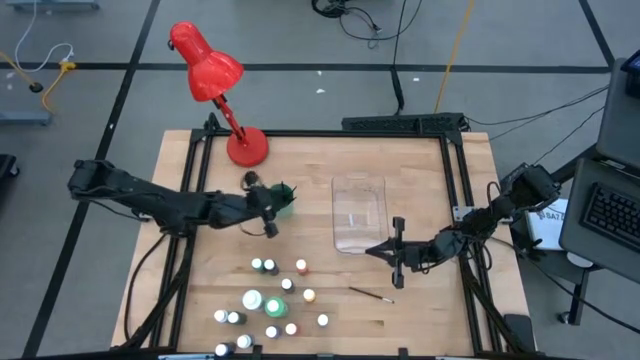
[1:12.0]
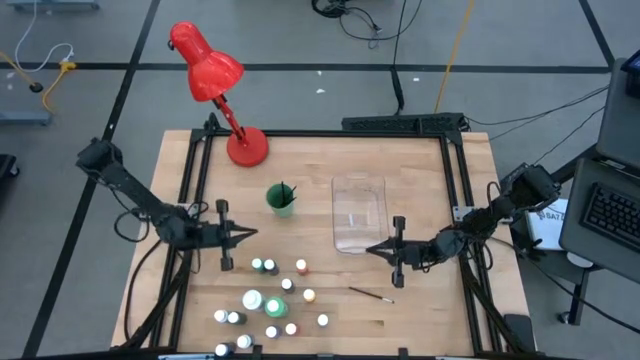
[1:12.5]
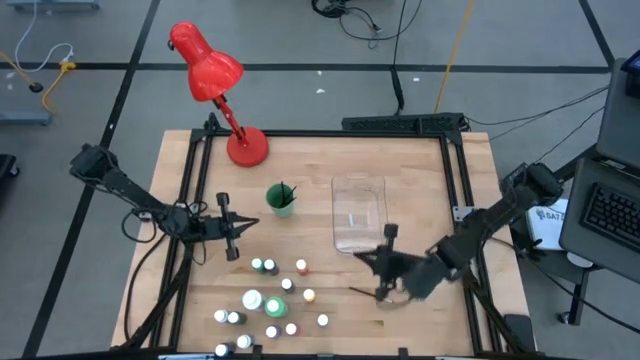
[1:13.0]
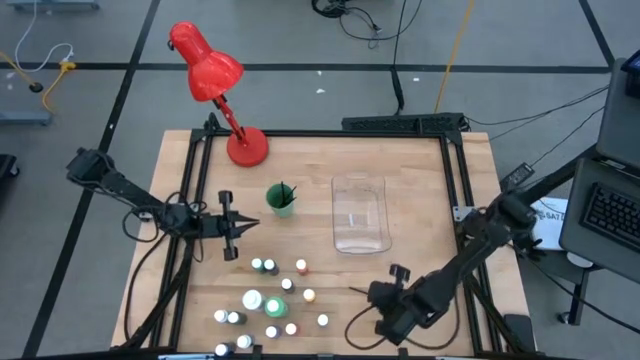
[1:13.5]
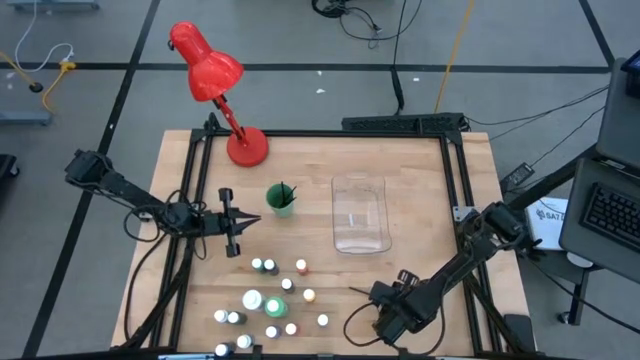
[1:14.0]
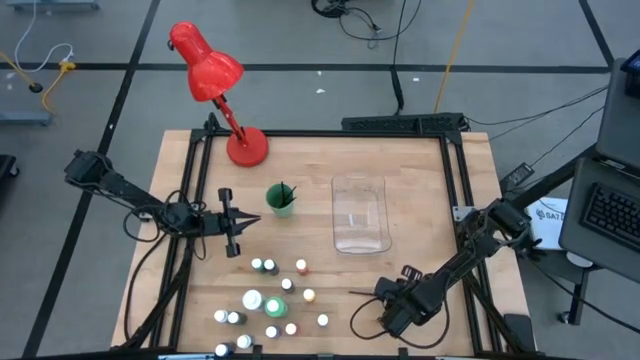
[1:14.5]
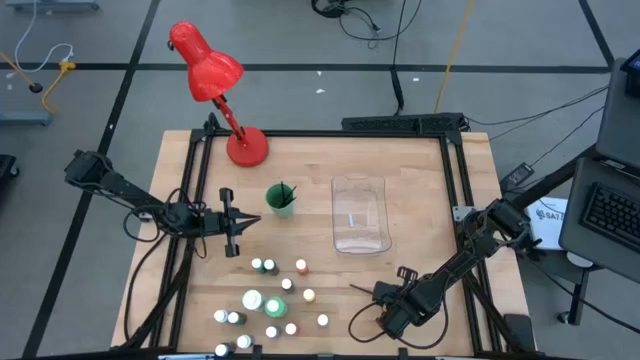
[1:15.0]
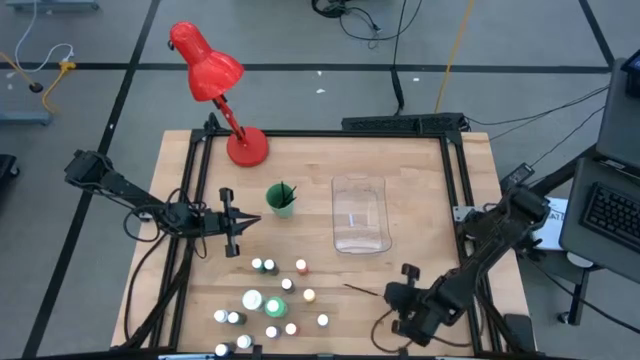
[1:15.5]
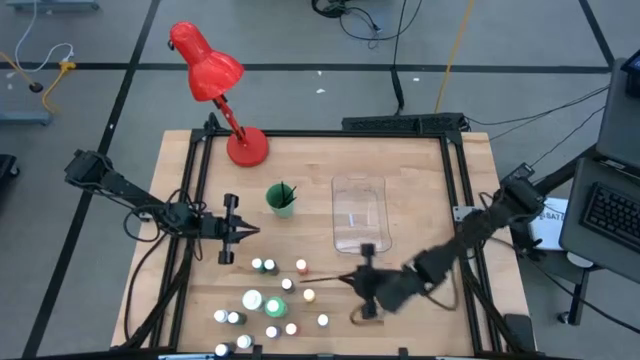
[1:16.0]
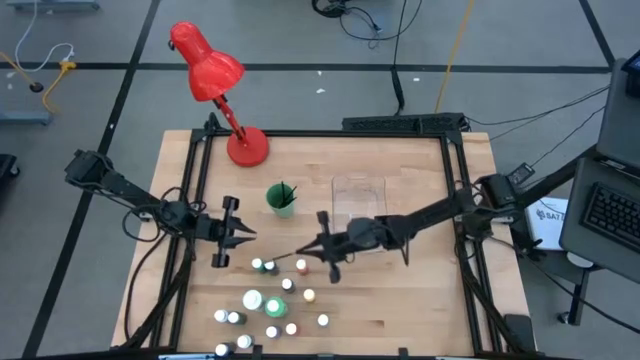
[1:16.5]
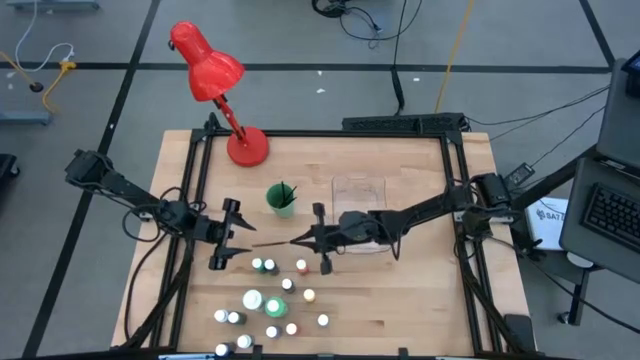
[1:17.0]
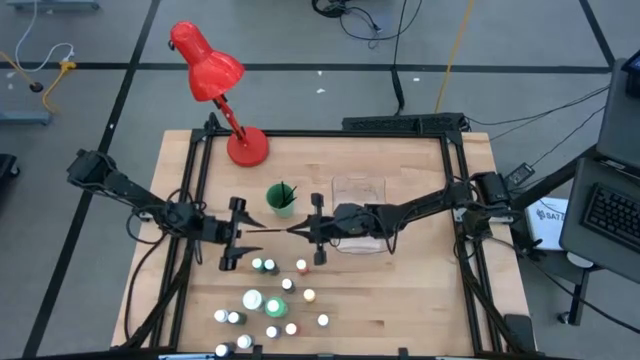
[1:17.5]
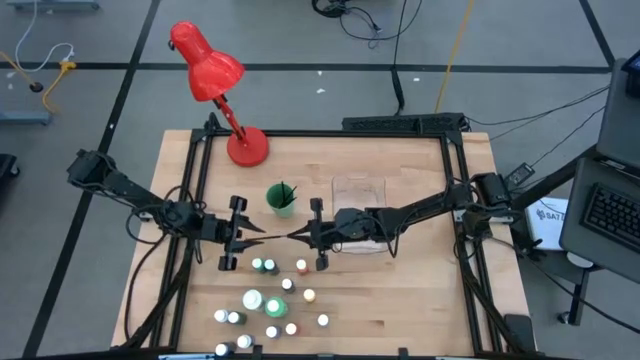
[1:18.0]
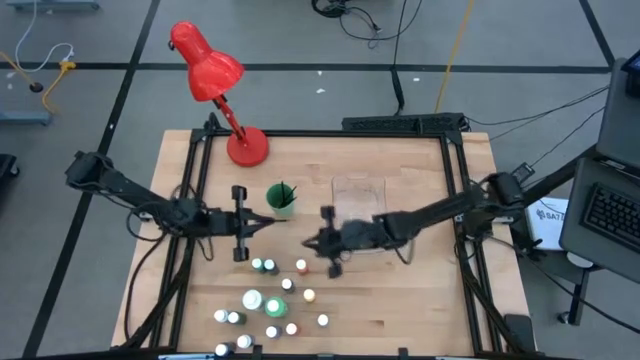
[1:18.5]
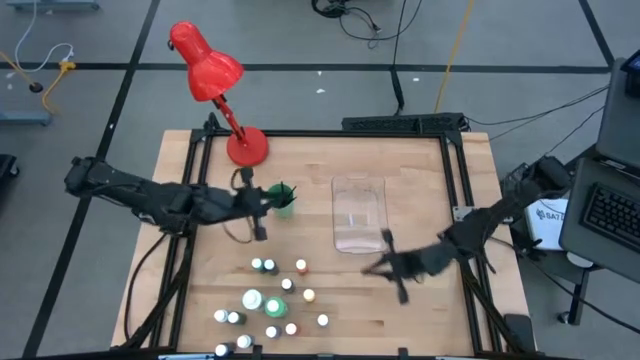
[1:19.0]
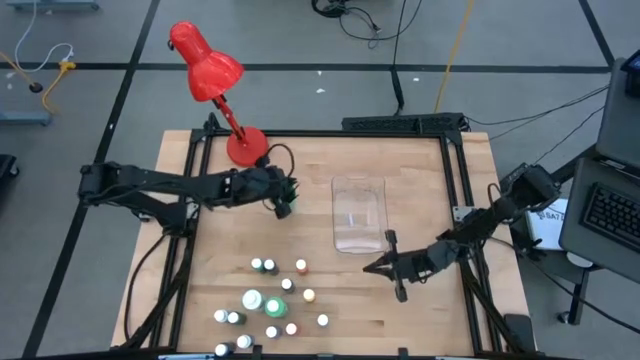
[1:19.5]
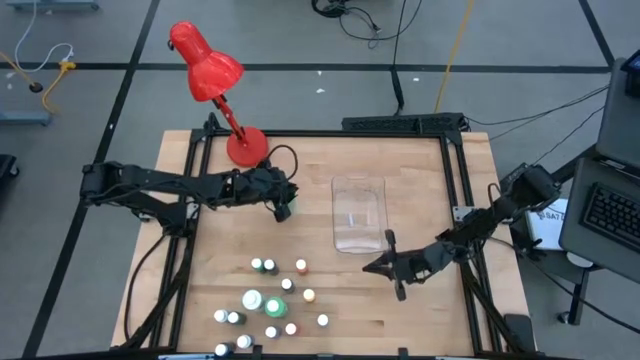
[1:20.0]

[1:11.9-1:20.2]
Task: Pick & Place Paint Supplies
Put the silver paintbrush into the green cup

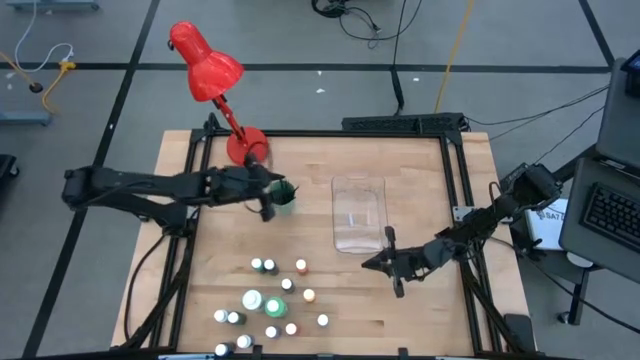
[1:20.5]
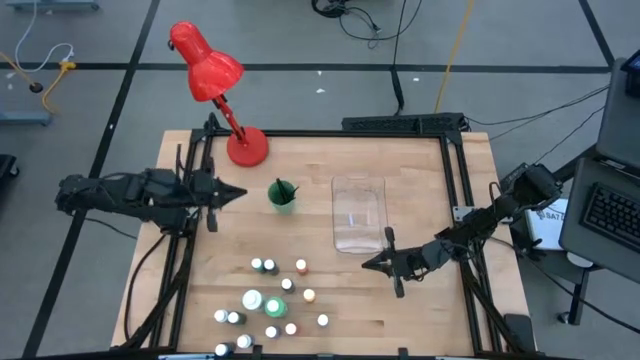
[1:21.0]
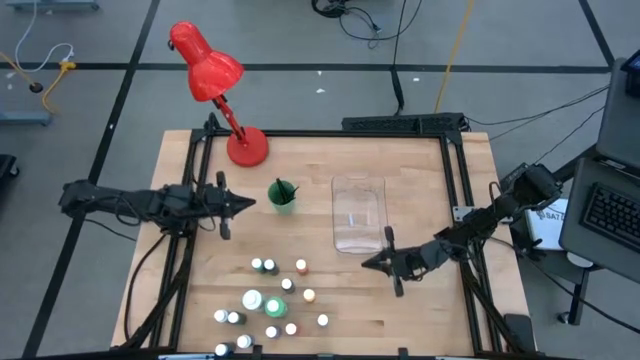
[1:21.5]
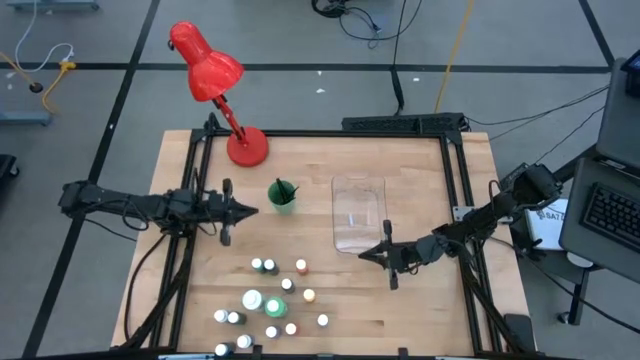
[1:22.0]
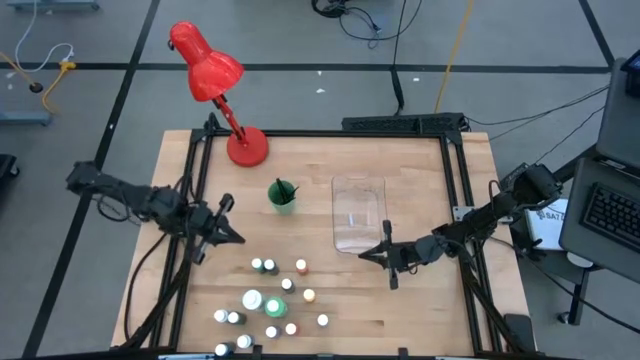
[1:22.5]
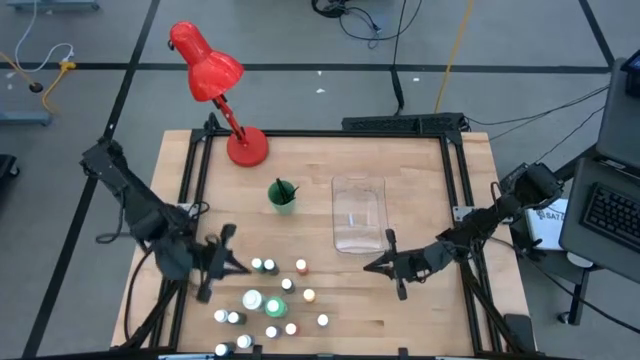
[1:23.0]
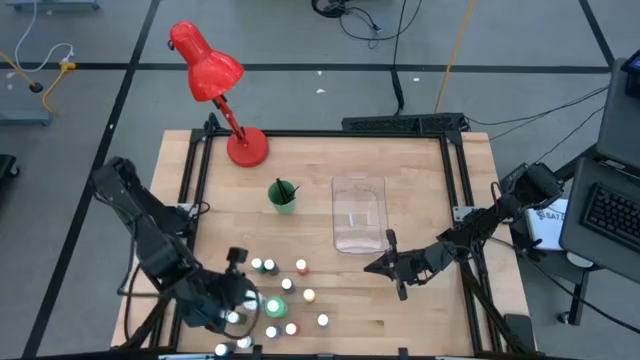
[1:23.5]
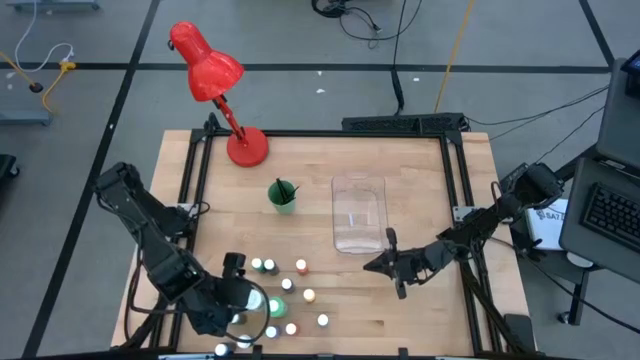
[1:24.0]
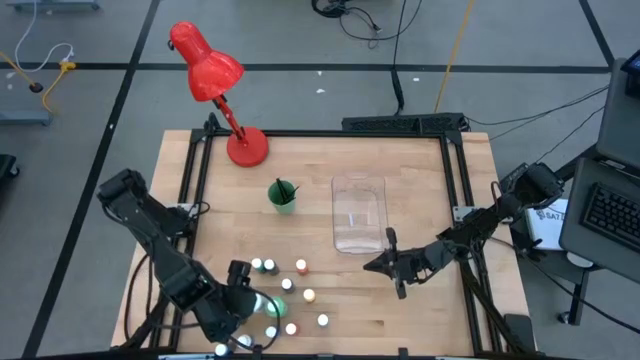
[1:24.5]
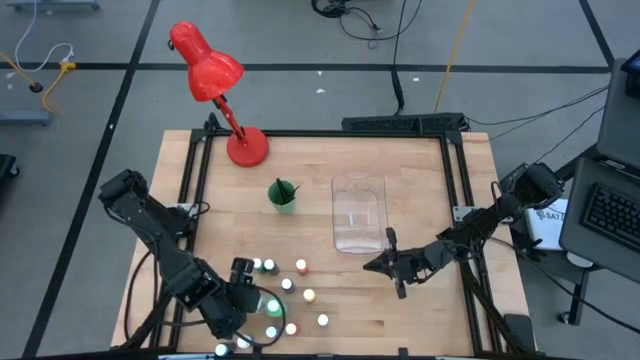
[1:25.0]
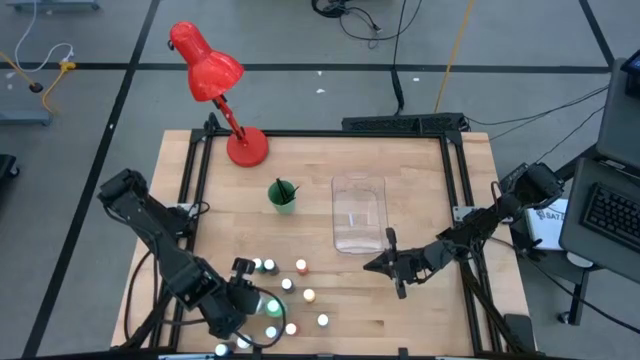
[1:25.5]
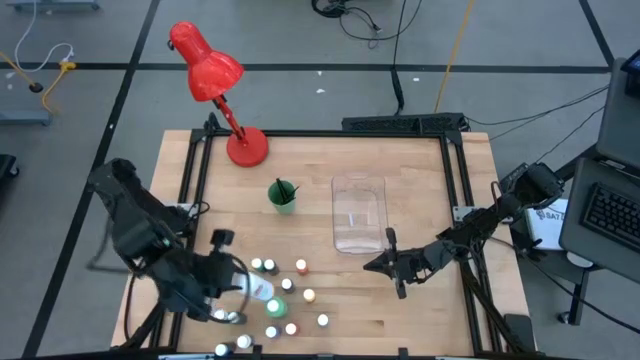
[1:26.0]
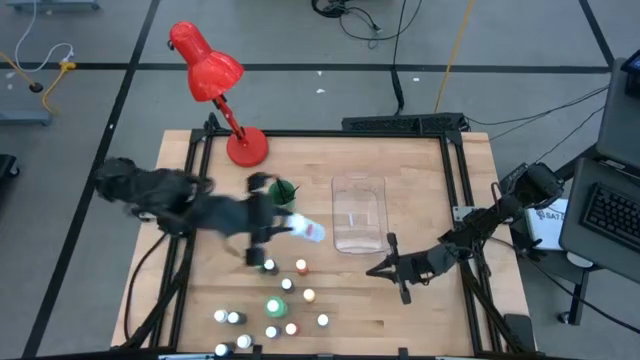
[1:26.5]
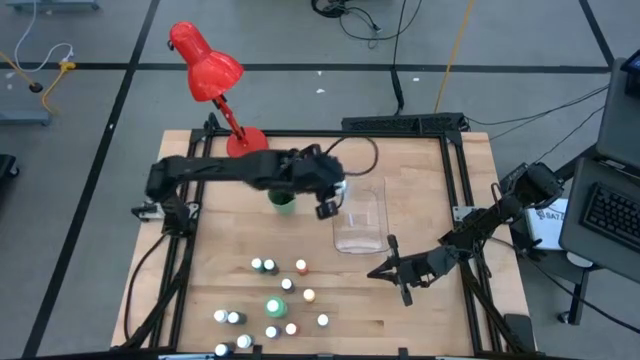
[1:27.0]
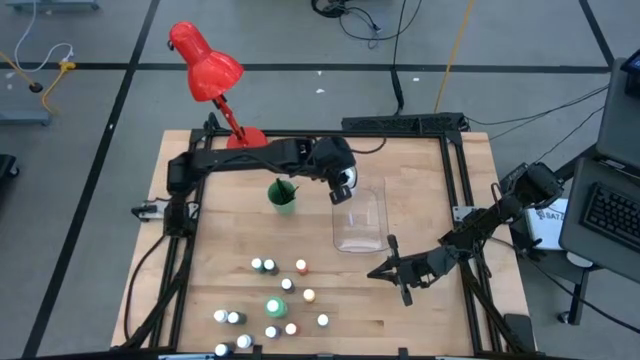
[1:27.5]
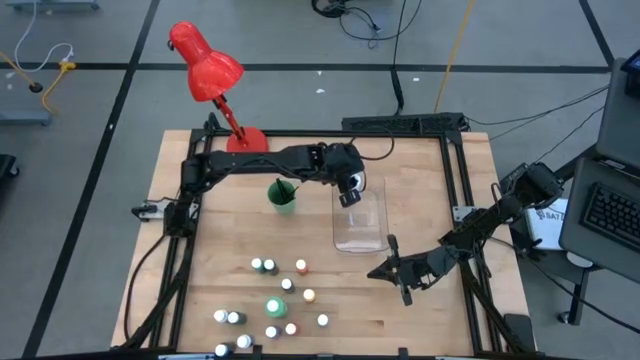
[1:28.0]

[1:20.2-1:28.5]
Put the large white paint bottle into the transparent bin

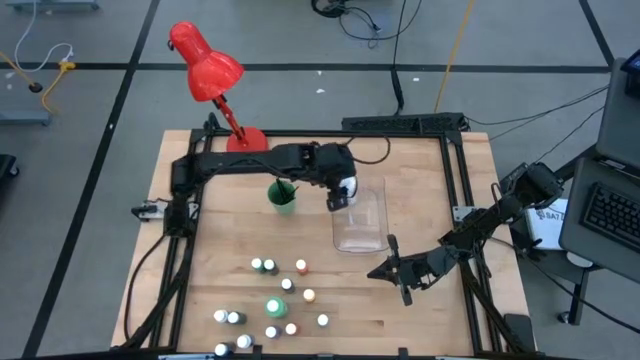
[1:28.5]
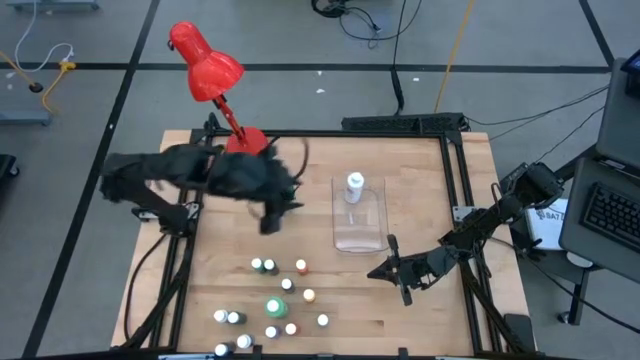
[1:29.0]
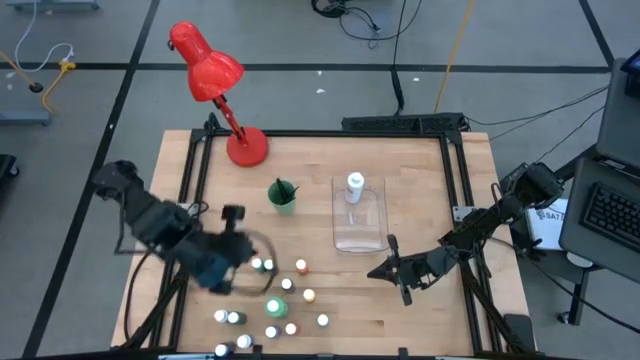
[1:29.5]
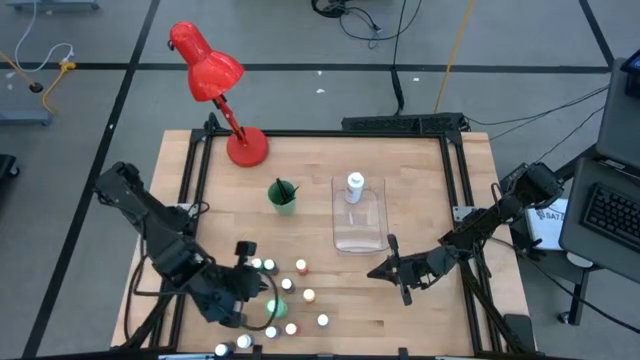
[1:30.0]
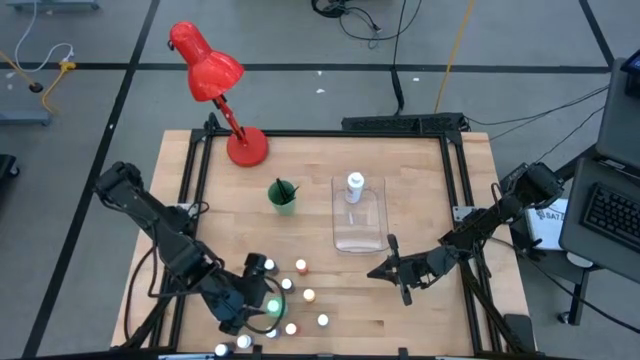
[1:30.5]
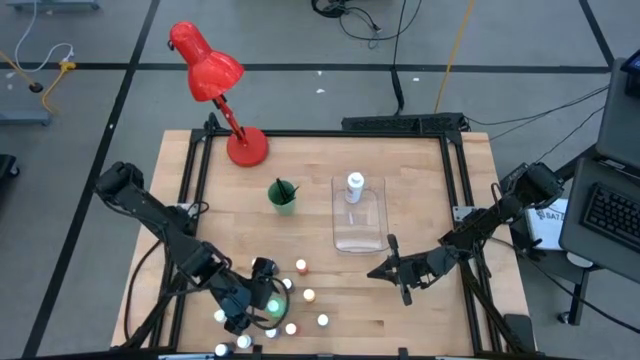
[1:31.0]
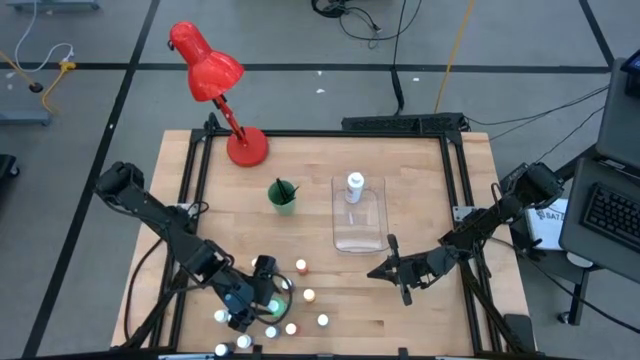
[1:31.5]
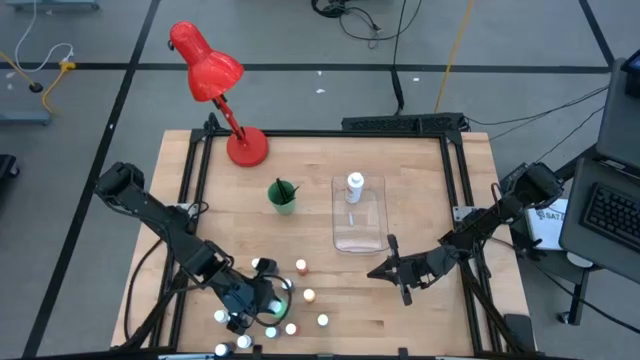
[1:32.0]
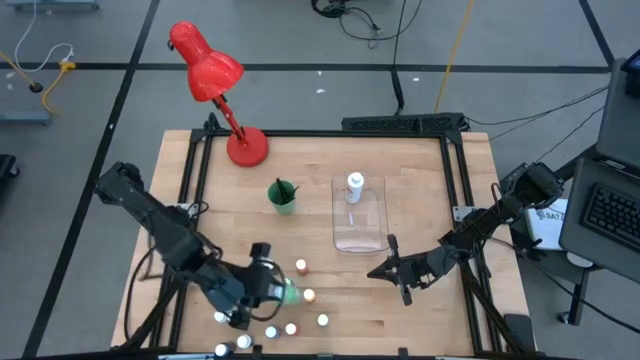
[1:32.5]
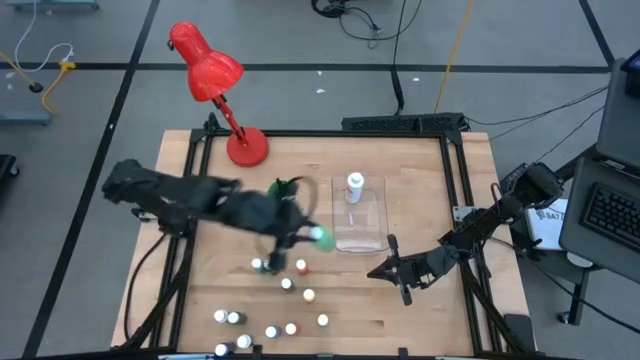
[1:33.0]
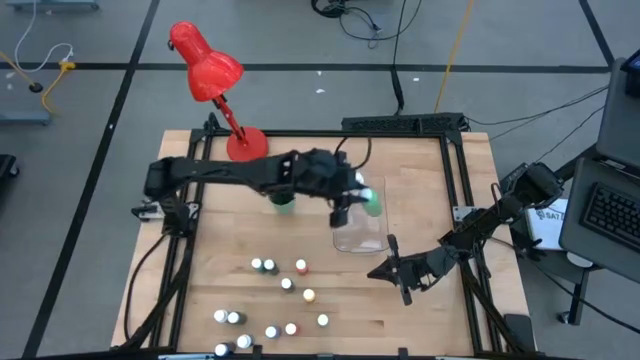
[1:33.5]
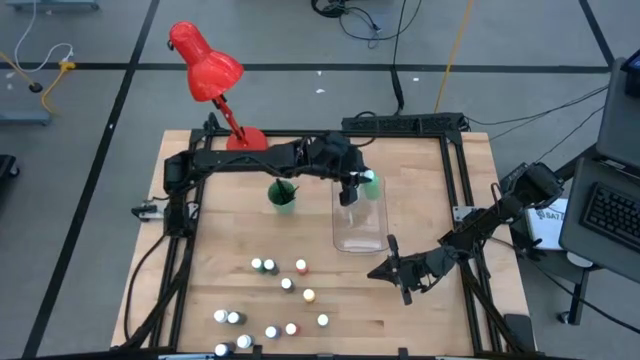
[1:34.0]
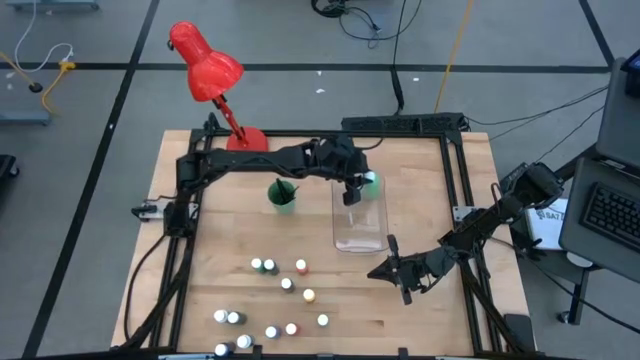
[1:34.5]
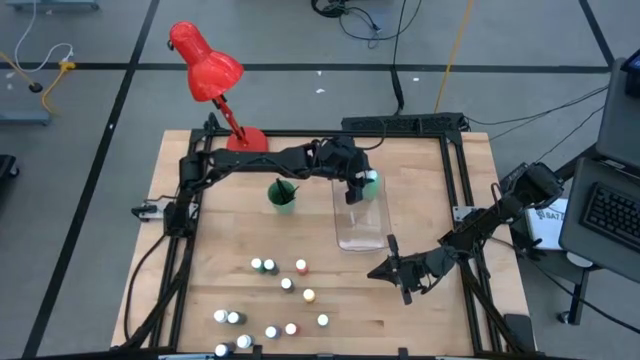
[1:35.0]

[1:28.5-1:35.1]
Put the large green paint bottle into the transparent bin
